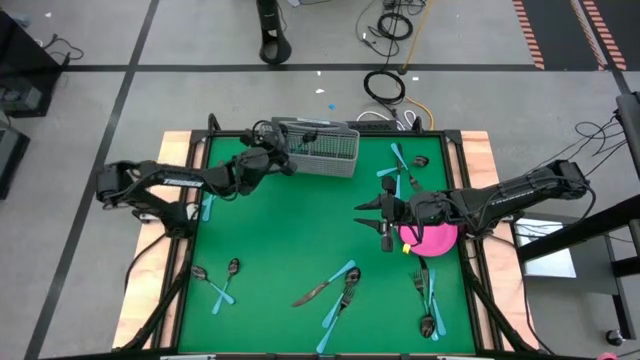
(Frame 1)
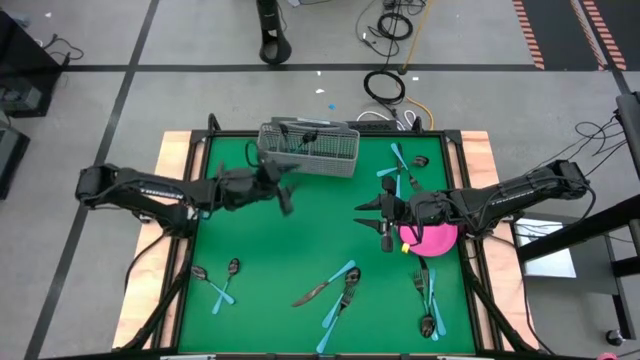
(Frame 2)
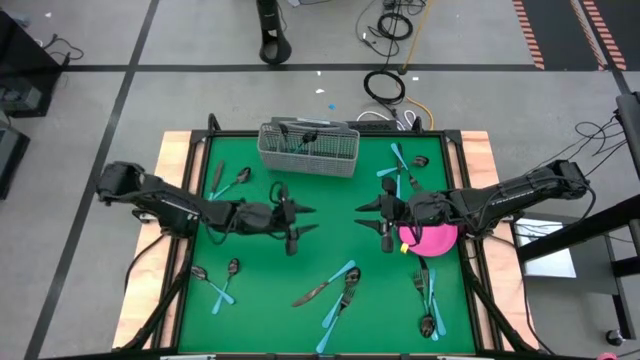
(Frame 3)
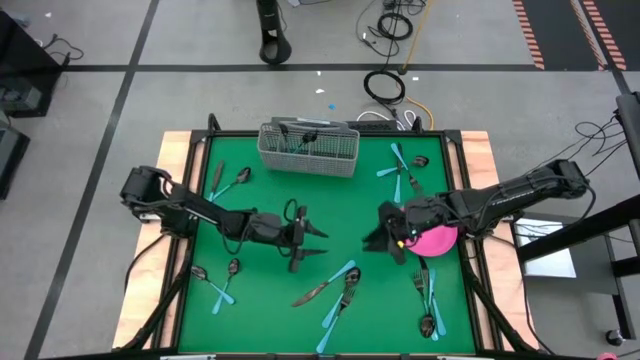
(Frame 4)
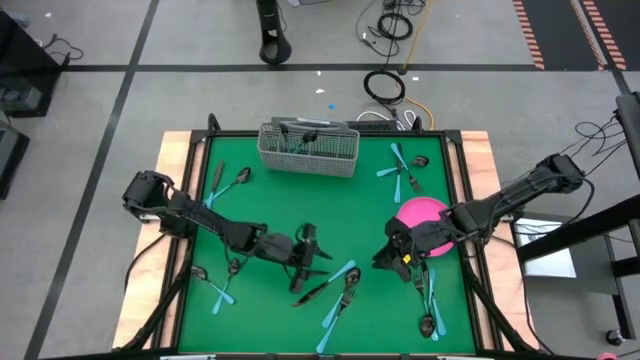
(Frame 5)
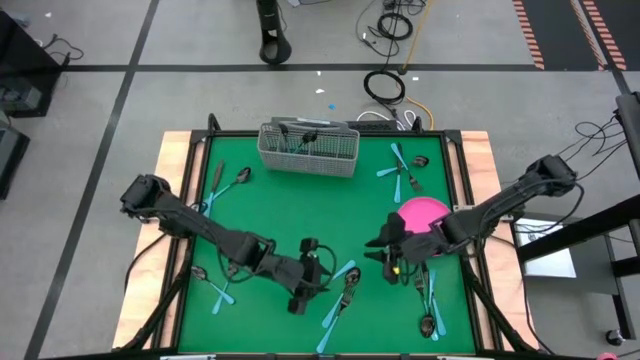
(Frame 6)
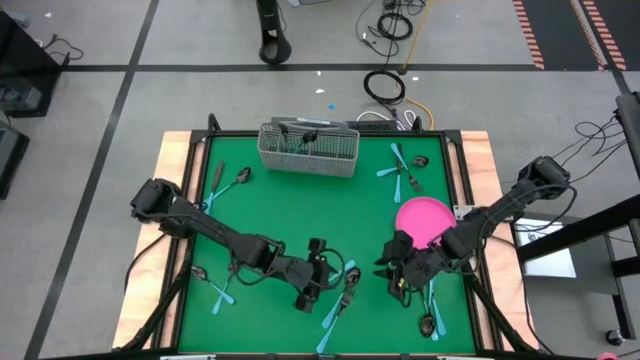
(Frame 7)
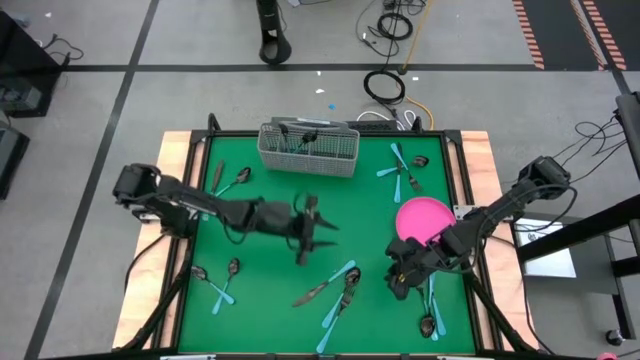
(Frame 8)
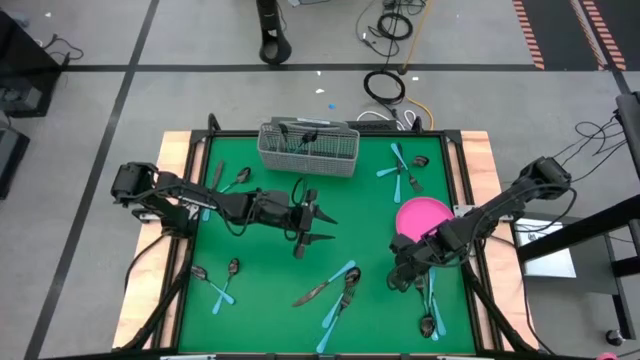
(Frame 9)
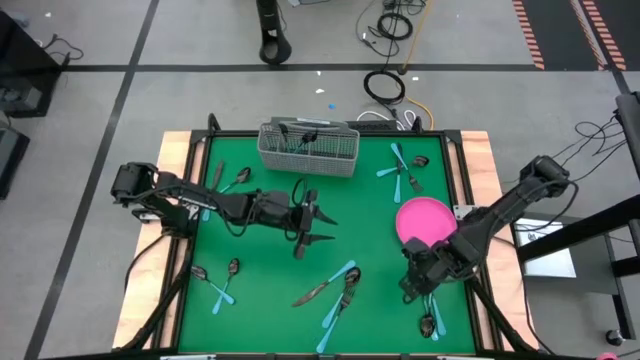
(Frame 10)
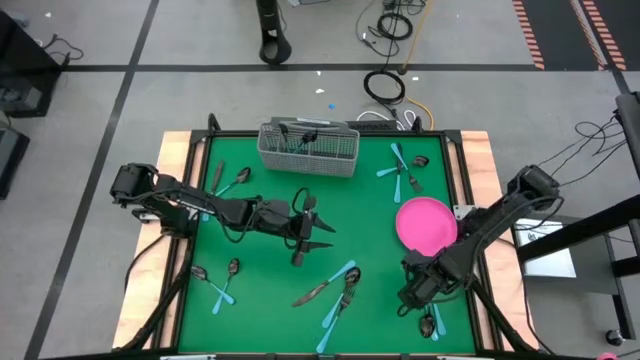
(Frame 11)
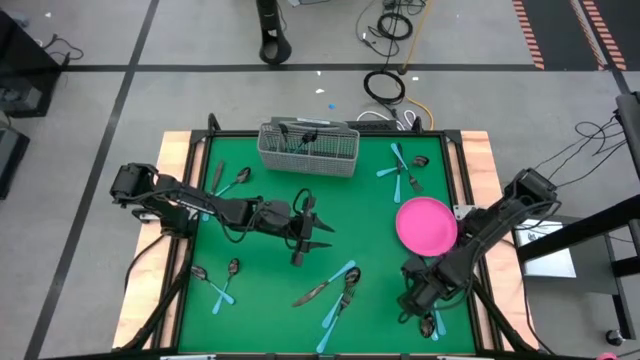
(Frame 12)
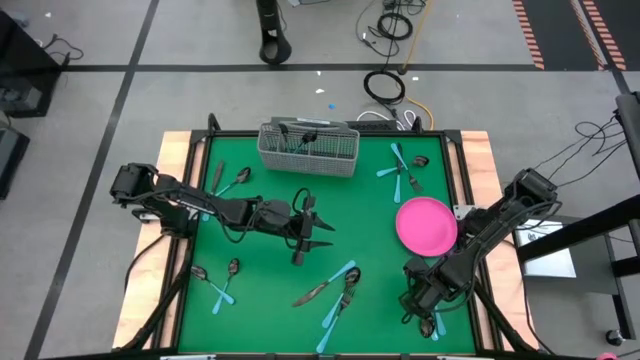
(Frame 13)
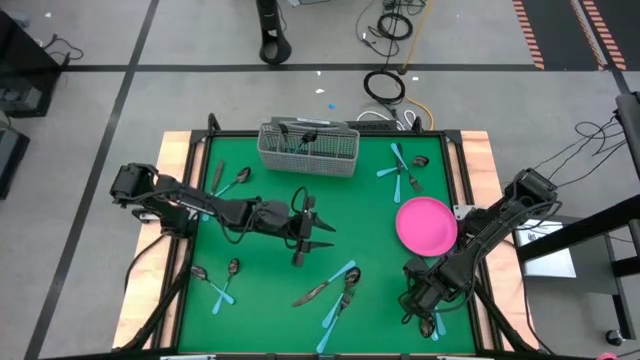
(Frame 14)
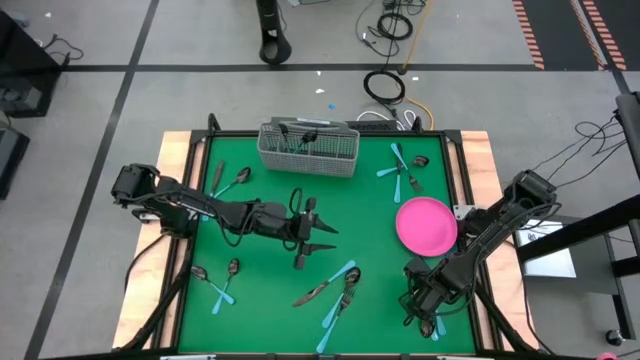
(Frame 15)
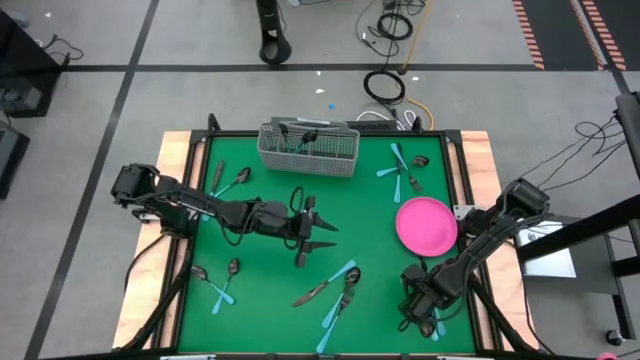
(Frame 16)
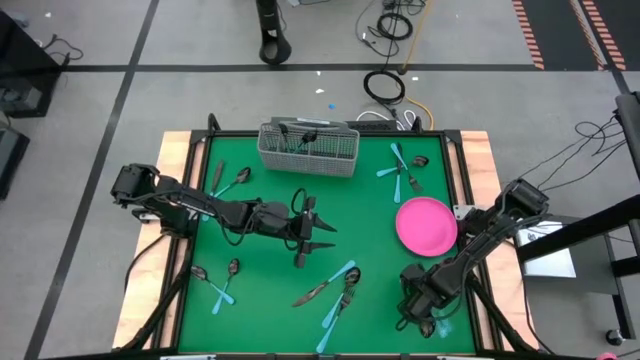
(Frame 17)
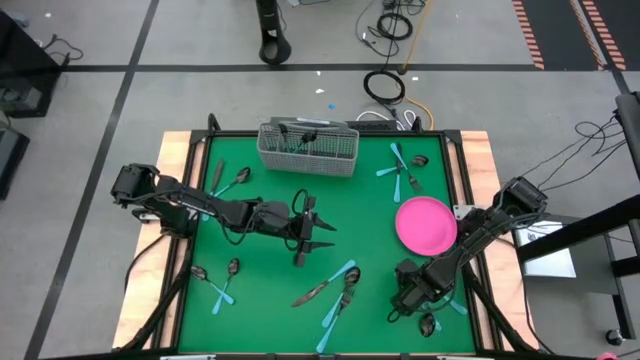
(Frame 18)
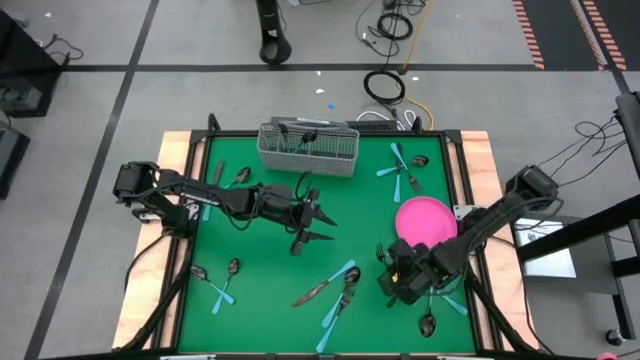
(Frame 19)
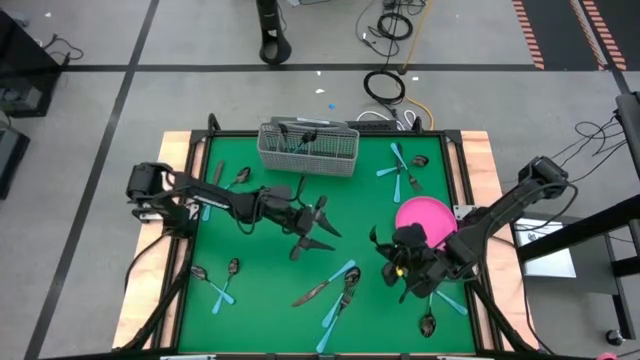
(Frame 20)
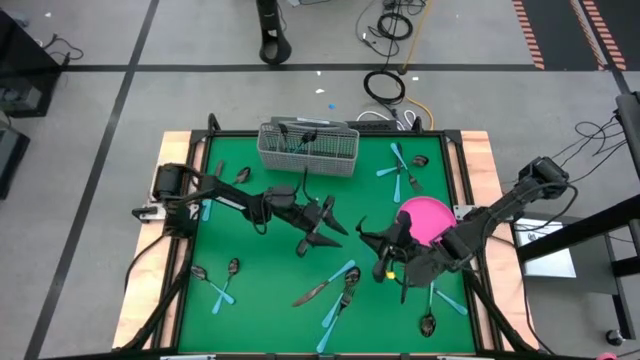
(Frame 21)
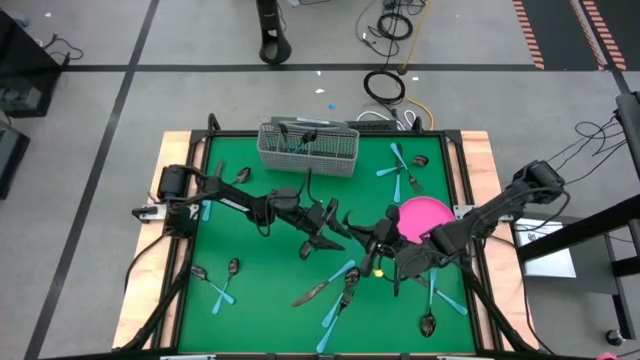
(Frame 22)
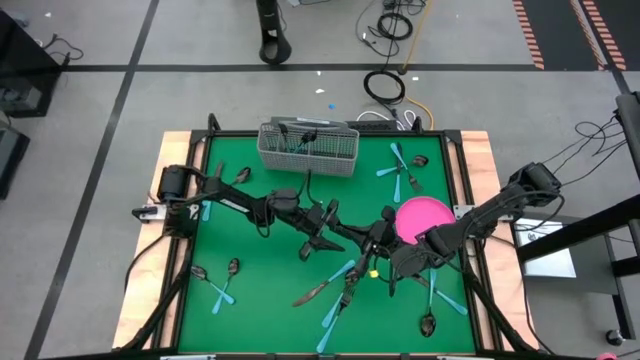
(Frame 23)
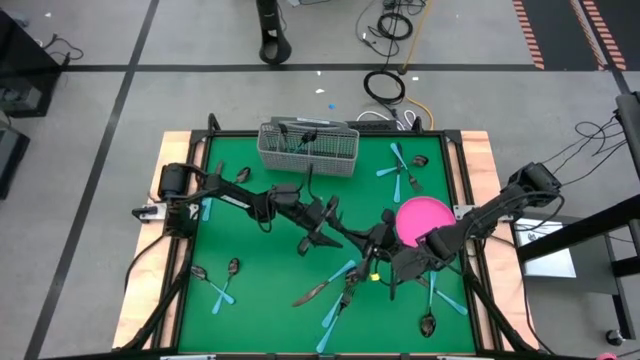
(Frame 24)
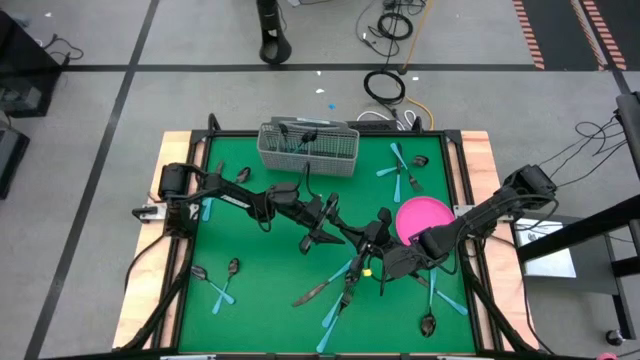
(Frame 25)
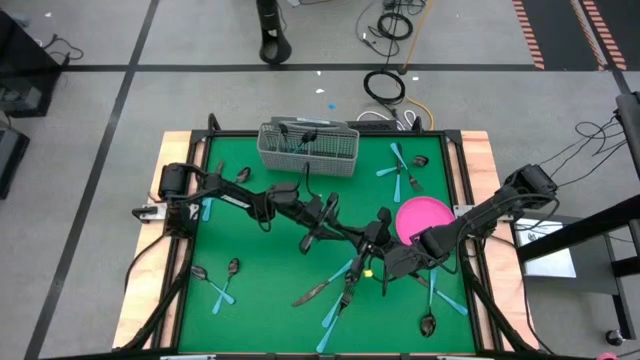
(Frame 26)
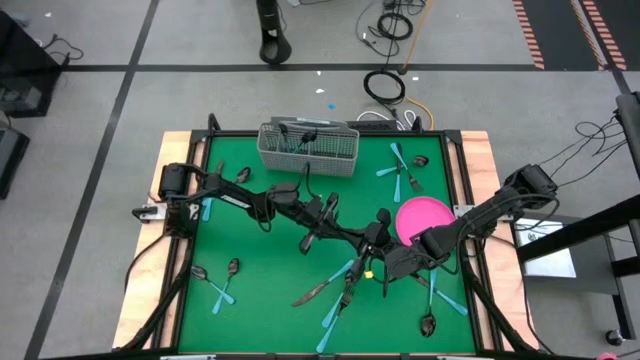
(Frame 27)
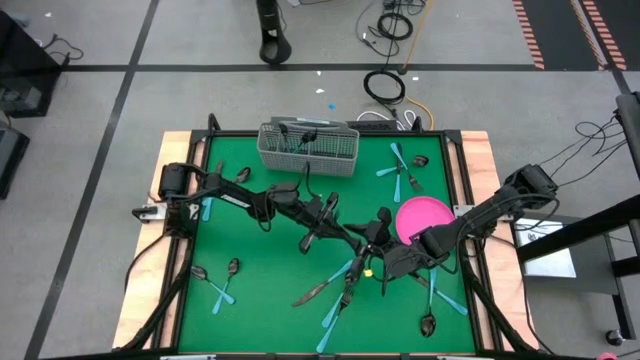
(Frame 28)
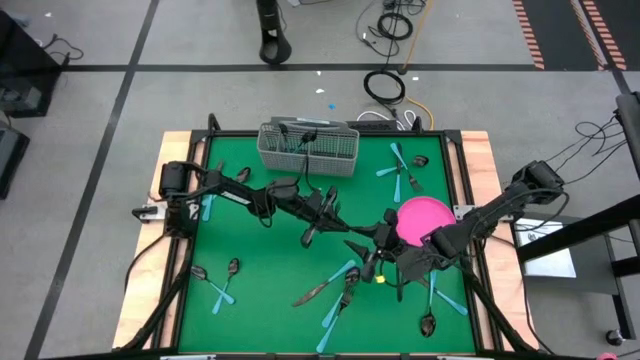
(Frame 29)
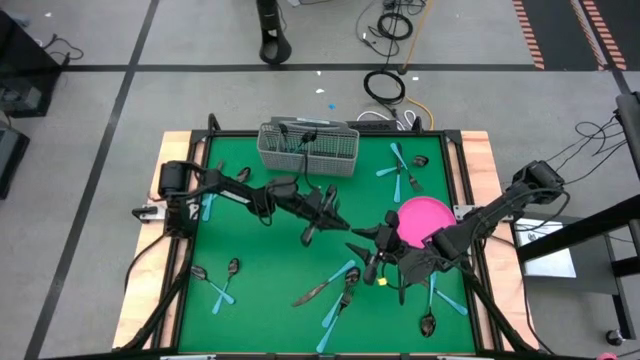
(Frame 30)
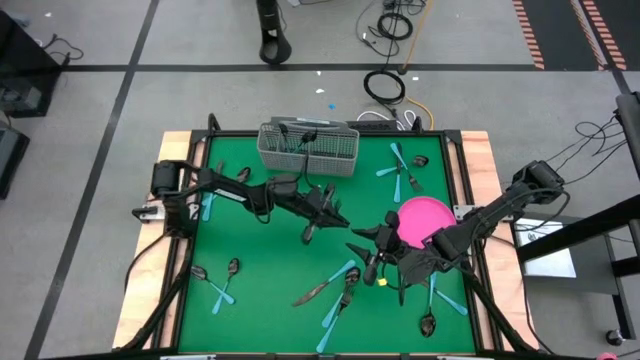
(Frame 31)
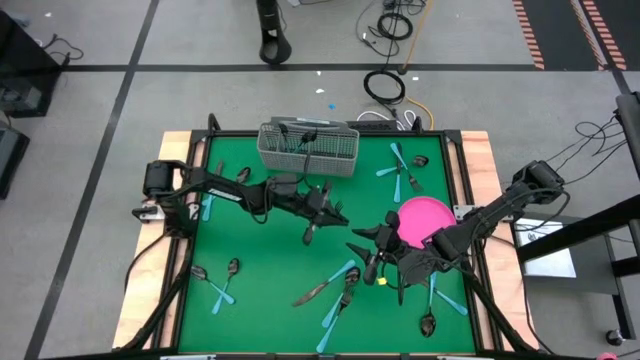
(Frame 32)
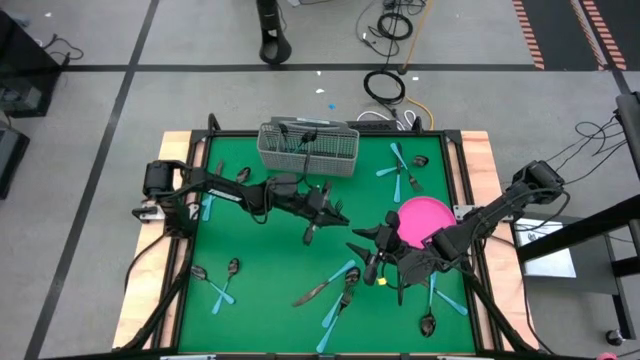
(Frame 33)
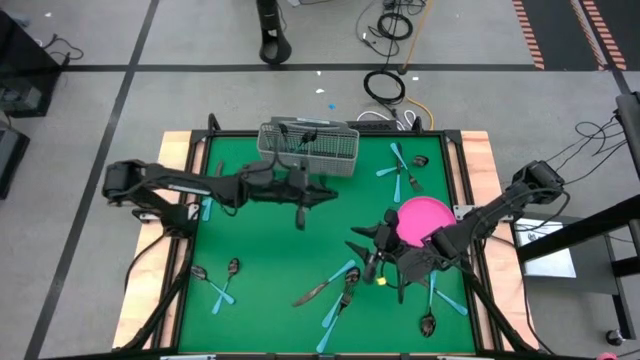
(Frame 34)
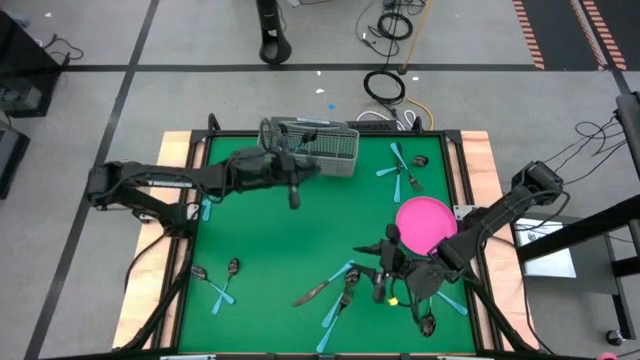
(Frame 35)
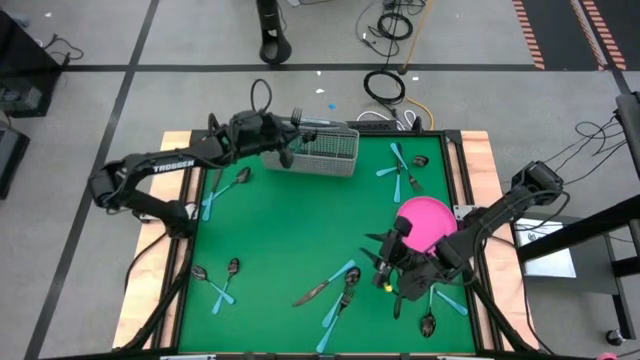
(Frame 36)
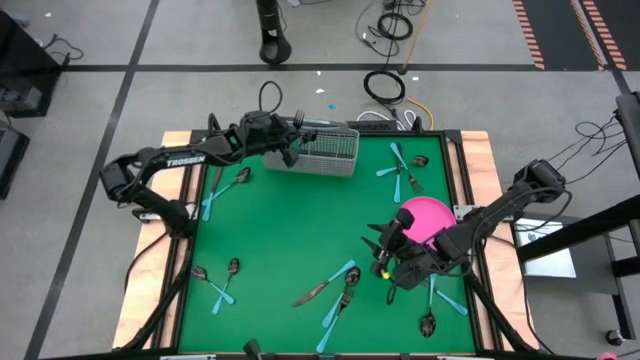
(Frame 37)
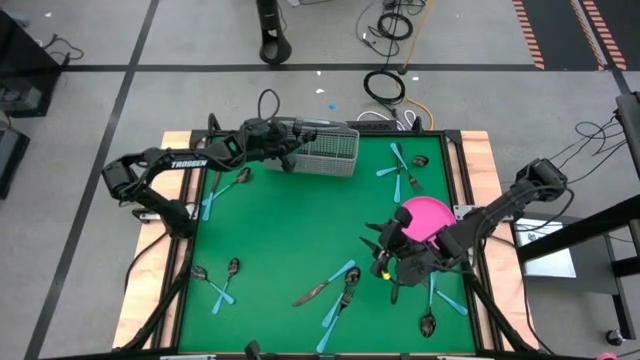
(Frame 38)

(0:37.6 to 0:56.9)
Task: Sort silverware
Put the blue fork into the silverware tray with the other blue forks

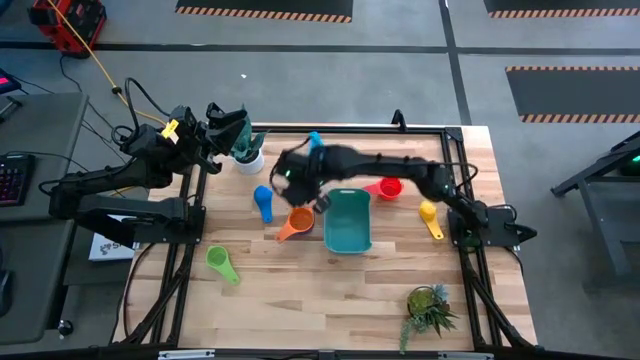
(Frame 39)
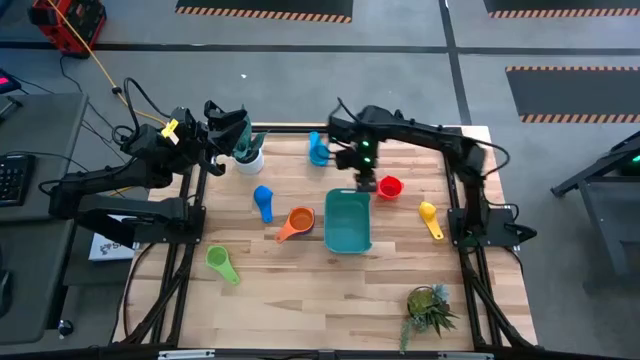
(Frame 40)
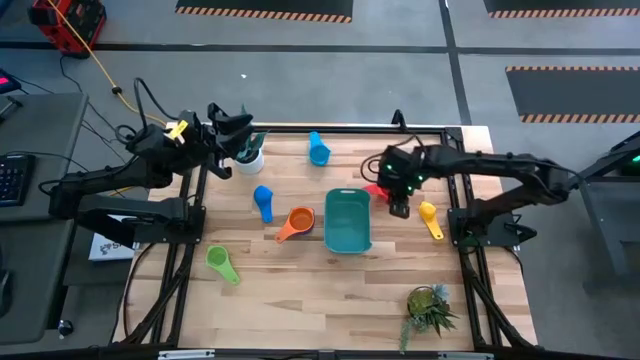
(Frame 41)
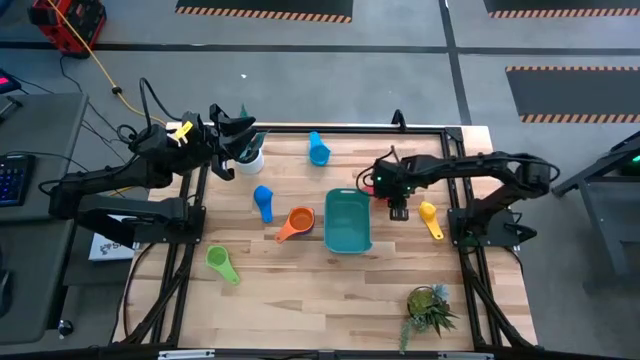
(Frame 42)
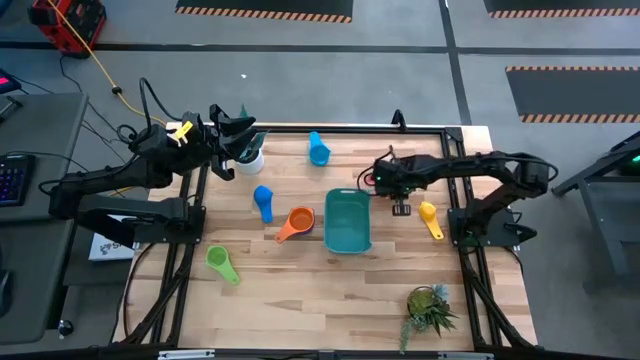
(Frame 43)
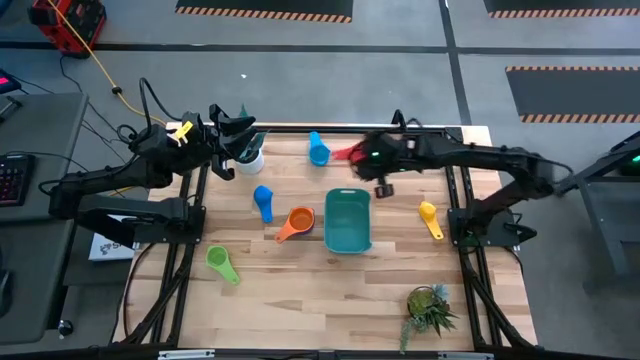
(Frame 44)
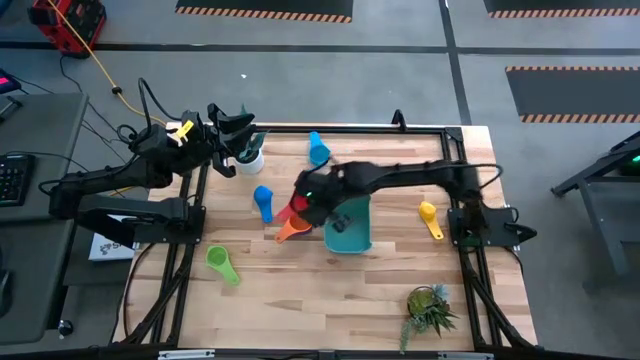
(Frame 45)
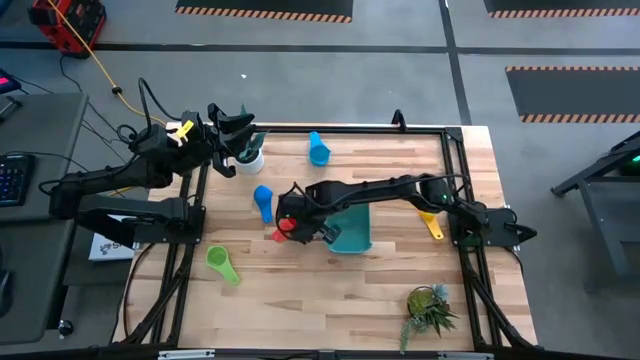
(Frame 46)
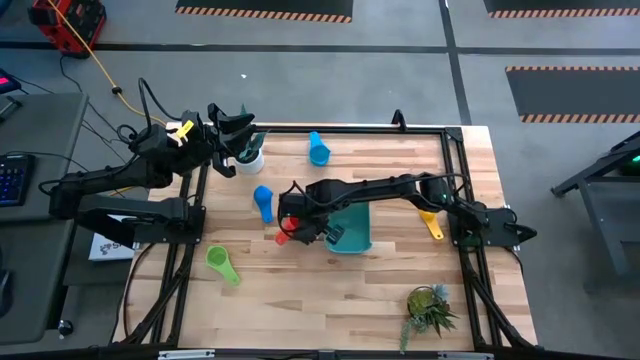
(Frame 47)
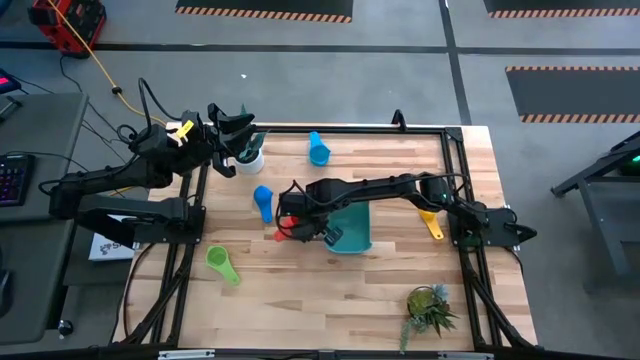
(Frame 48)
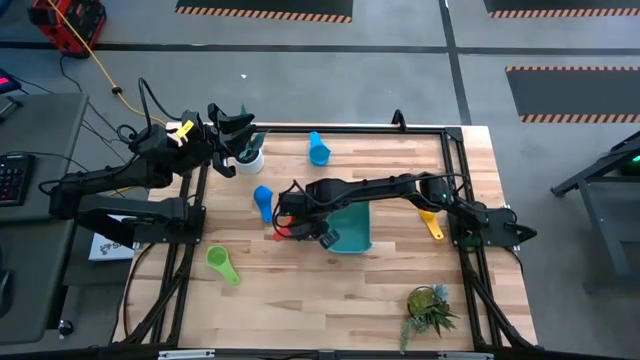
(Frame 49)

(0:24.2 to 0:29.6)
Task: Nest measuring cups in basket
Stack the red measuring cup on top of the orange measuring cup
